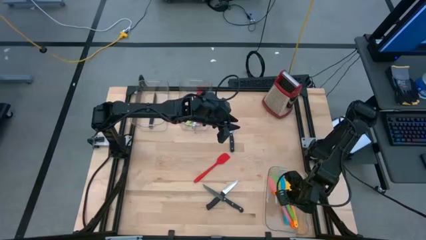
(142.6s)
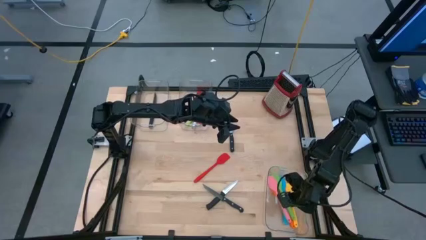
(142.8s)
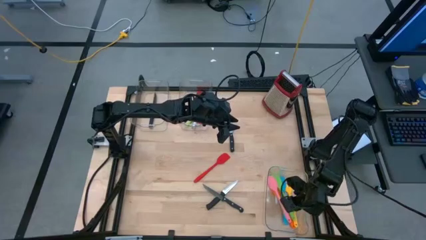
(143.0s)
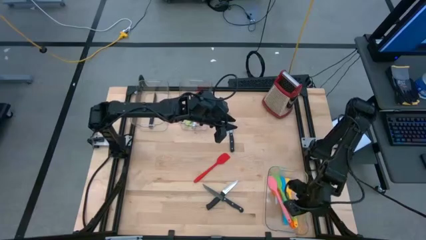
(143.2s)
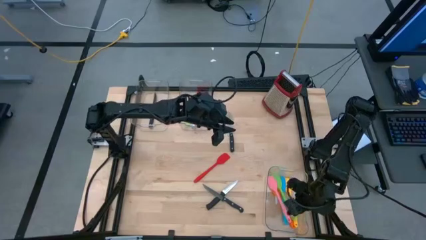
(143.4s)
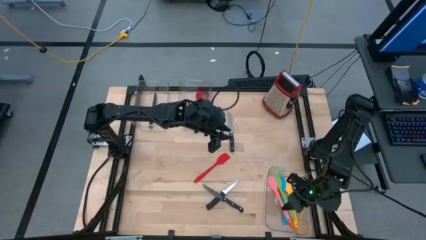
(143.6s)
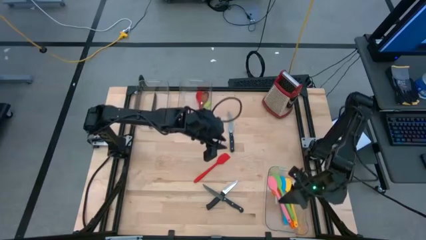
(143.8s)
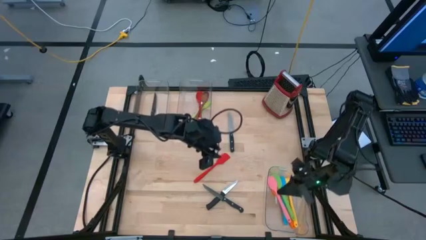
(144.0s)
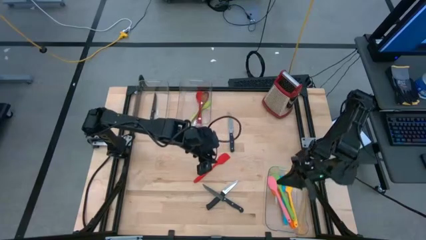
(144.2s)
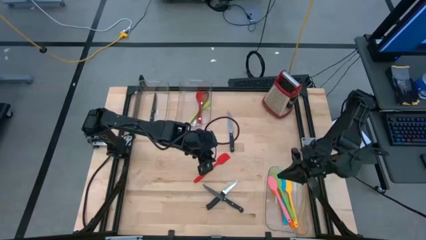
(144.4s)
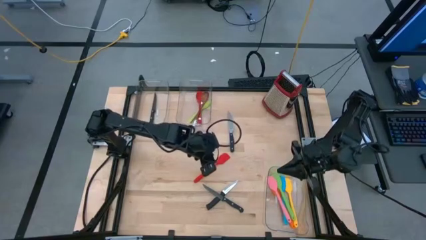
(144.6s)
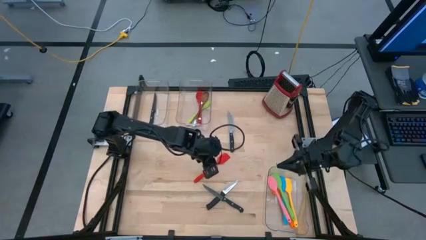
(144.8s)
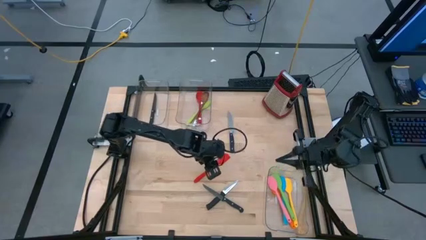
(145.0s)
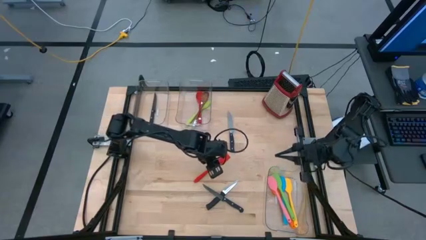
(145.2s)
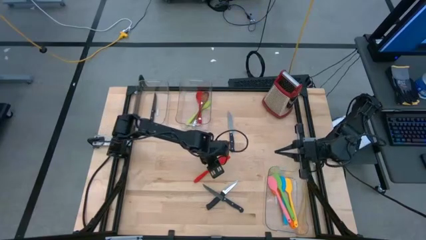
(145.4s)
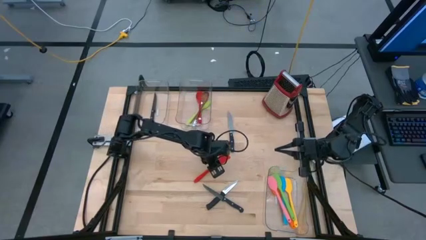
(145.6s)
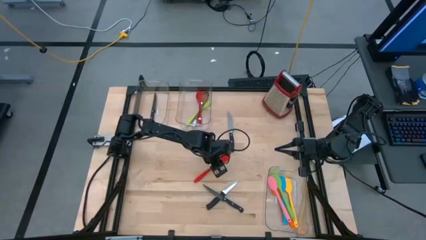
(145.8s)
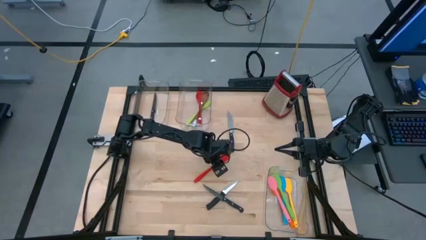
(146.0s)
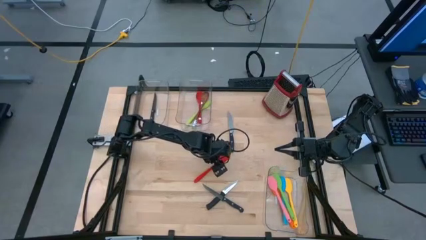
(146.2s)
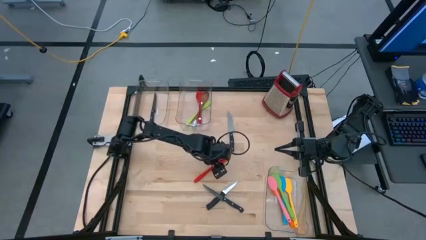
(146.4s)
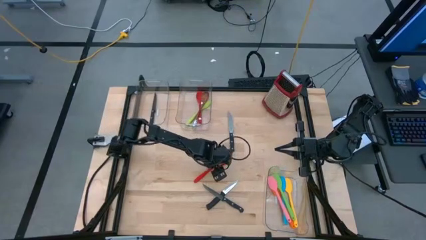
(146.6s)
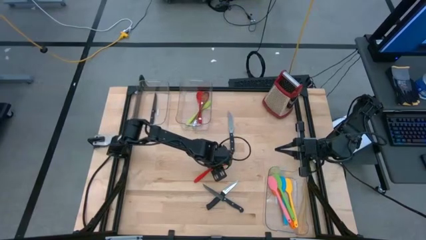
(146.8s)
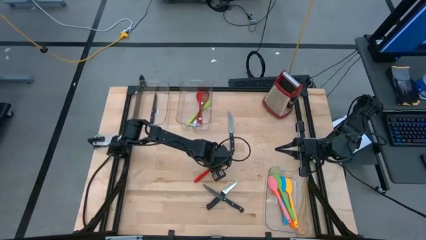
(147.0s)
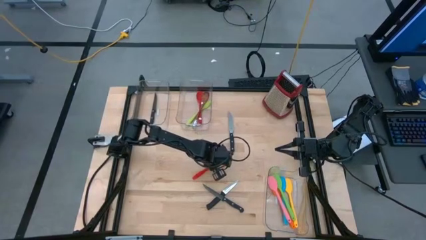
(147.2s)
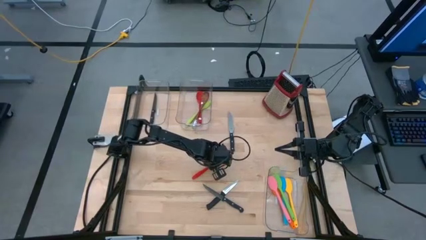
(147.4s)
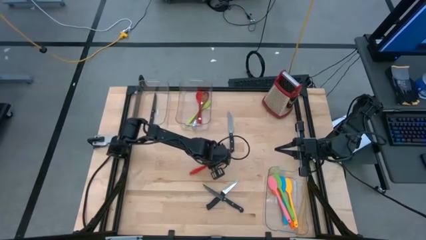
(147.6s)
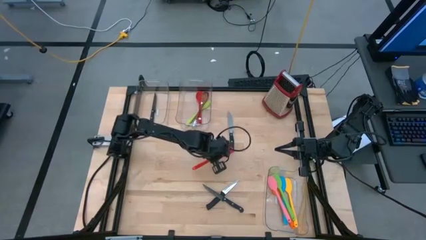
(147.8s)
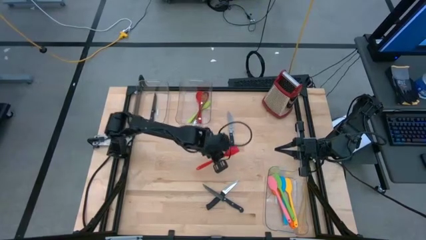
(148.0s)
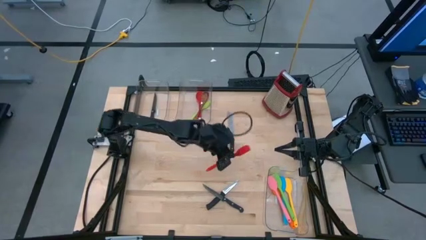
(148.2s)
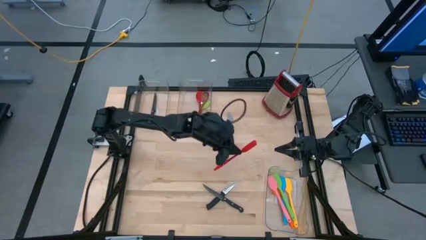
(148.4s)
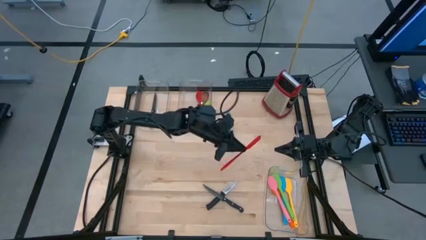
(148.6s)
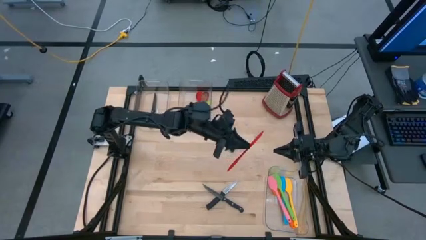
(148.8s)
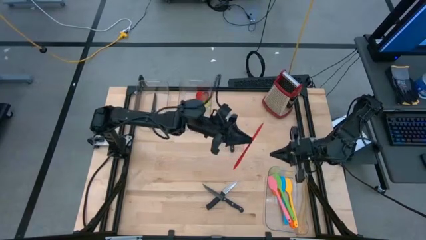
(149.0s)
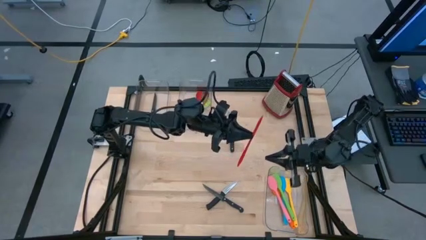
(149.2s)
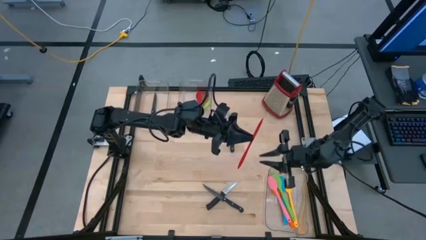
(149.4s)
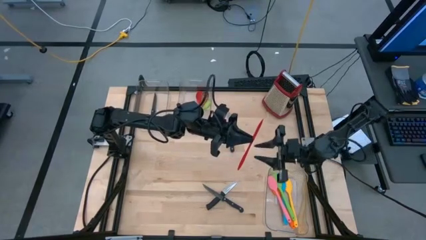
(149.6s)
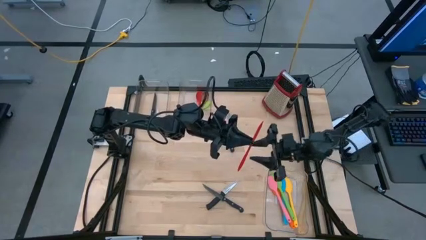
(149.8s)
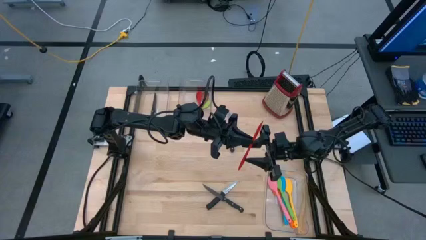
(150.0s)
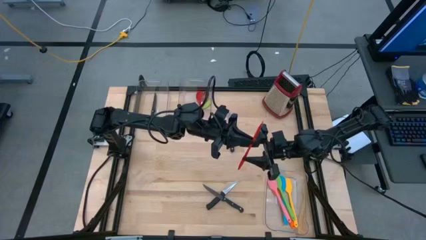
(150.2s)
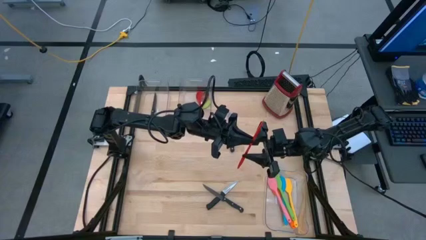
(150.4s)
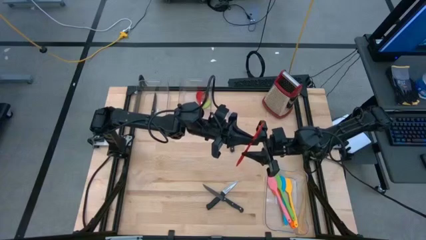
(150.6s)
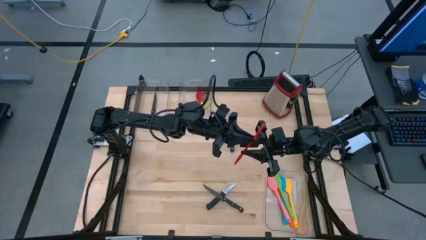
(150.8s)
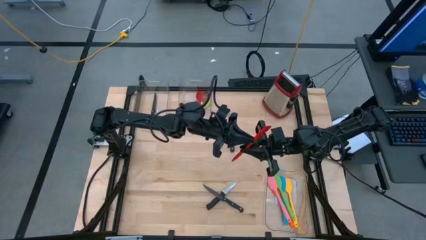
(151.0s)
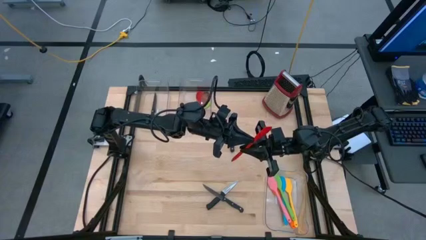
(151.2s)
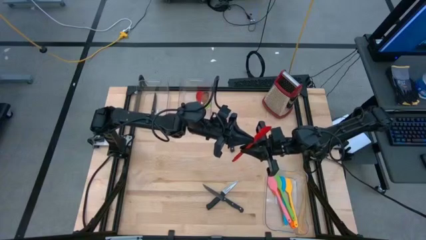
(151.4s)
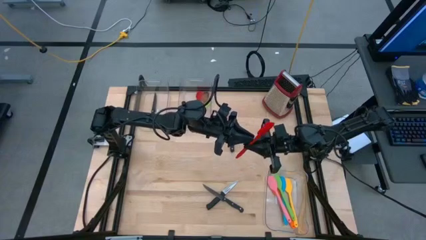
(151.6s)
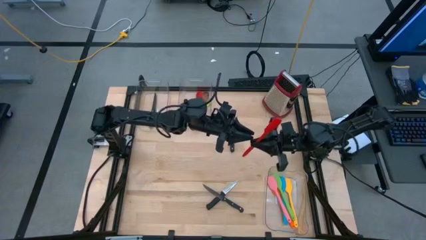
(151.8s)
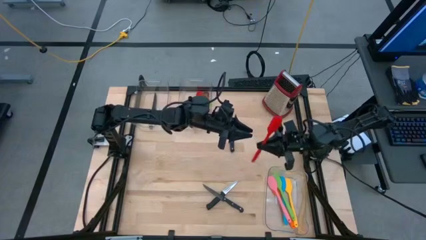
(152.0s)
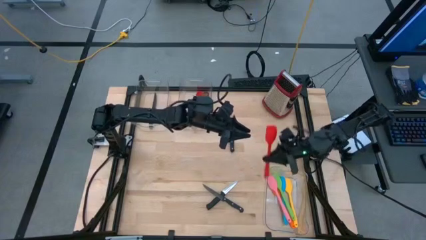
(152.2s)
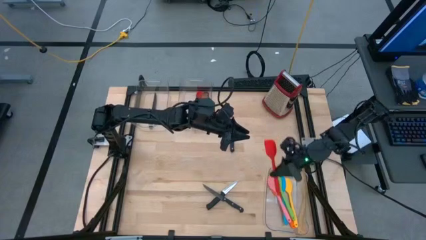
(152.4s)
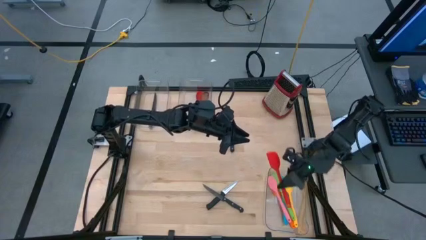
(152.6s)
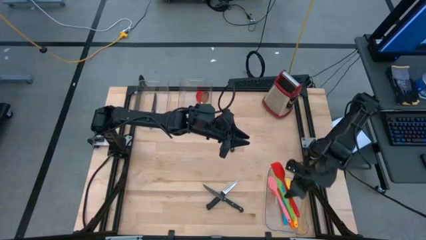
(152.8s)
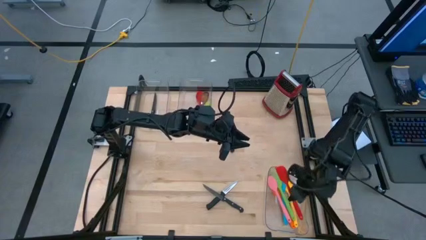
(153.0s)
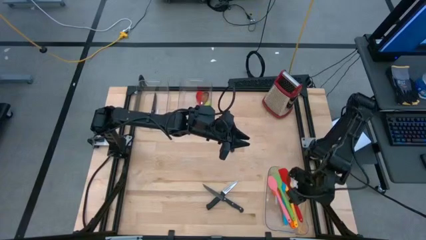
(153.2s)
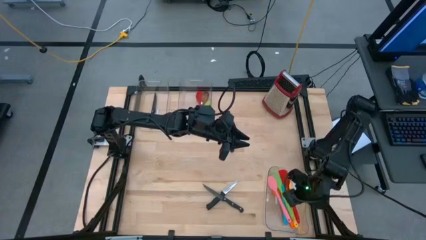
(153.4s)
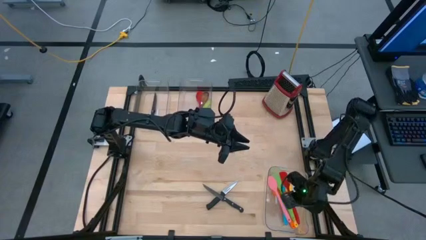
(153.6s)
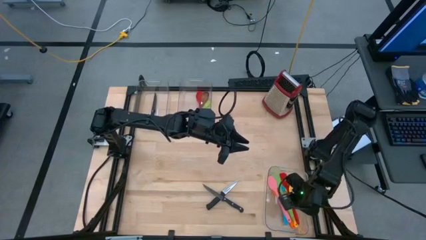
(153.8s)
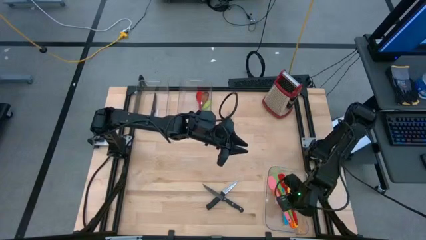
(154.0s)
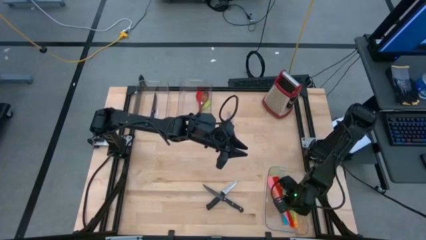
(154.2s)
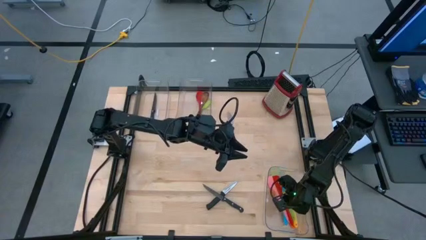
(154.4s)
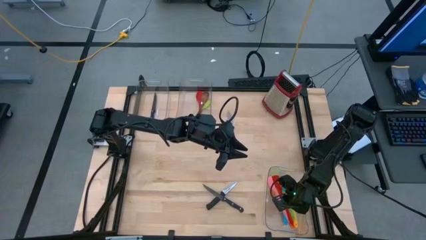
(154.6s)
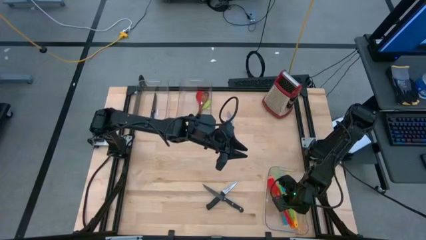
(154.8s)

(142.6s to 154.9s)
Task: Pick & Place Kitchen Items
Put the red spatula into the bottom transparent bin
